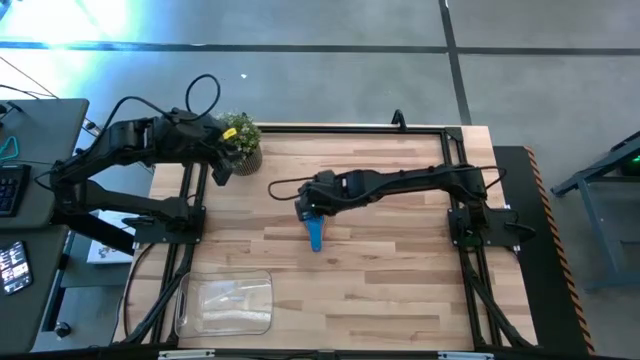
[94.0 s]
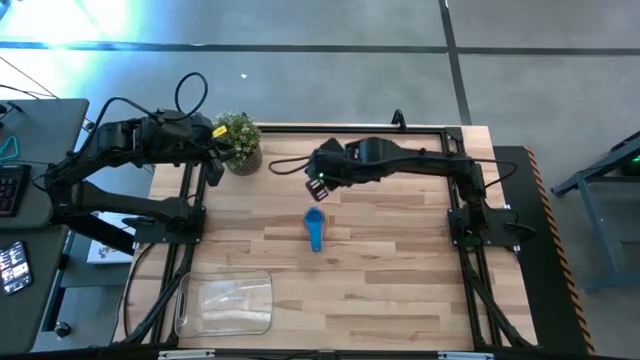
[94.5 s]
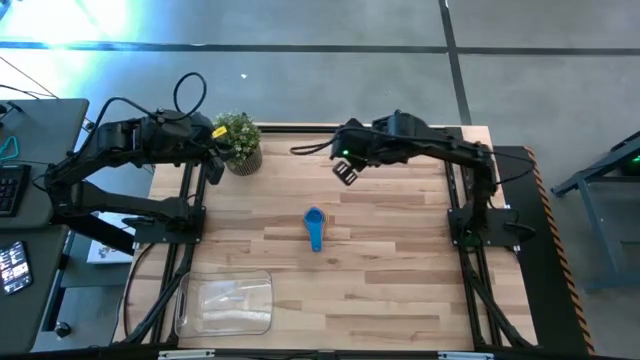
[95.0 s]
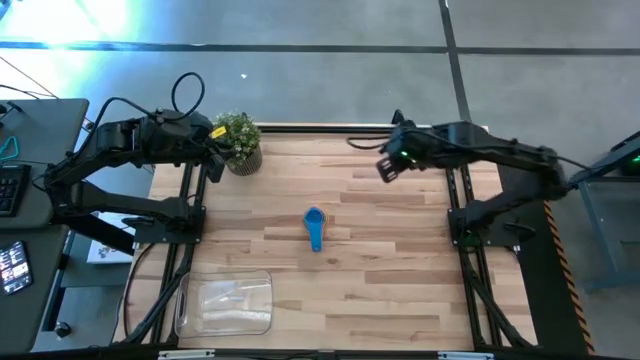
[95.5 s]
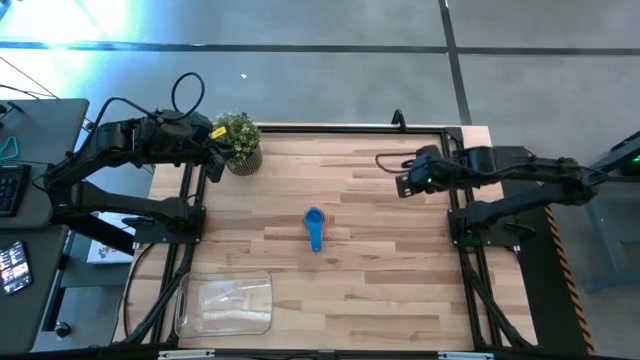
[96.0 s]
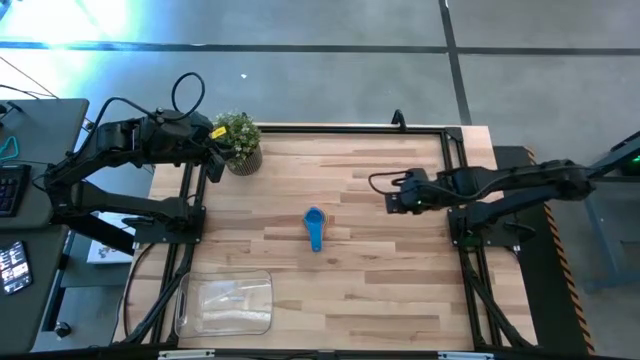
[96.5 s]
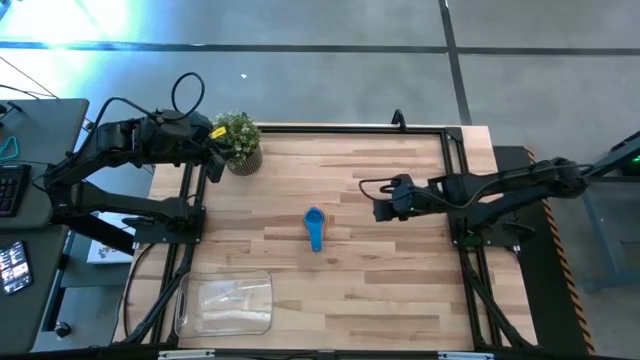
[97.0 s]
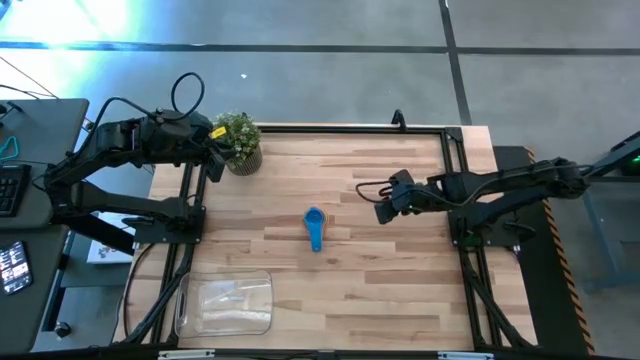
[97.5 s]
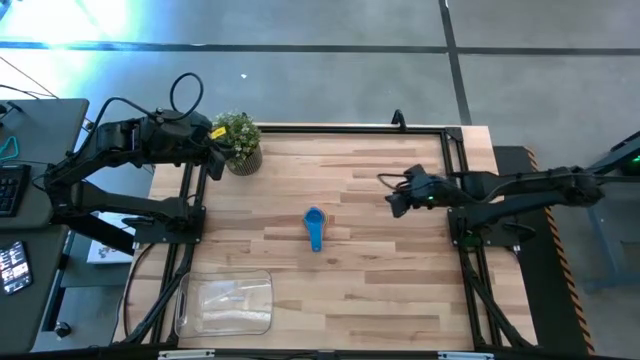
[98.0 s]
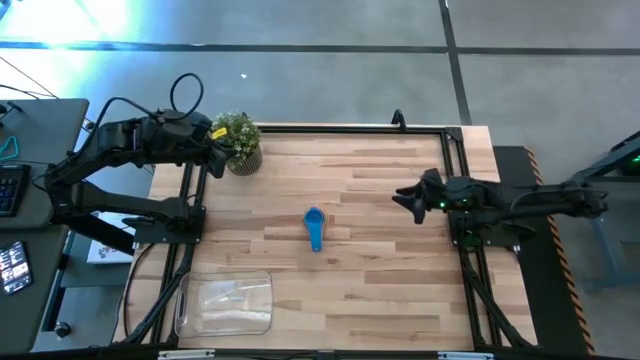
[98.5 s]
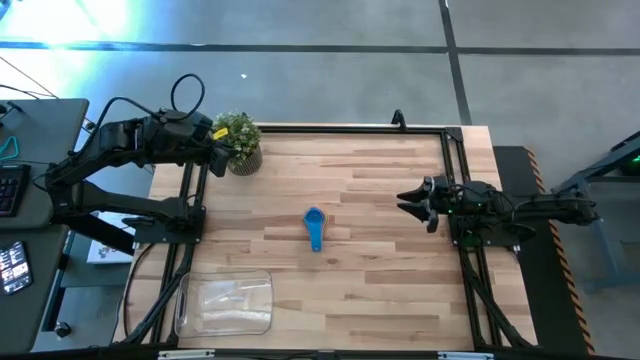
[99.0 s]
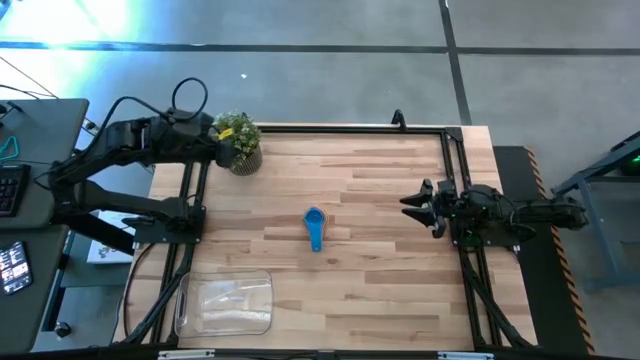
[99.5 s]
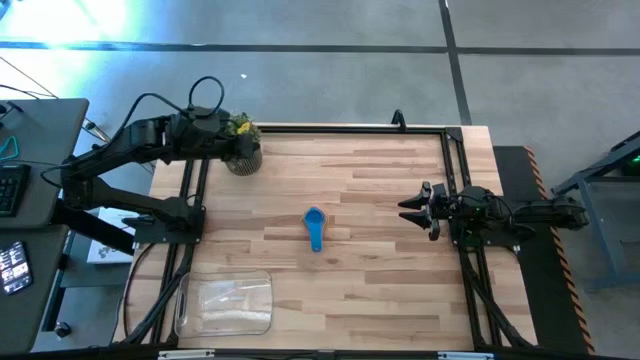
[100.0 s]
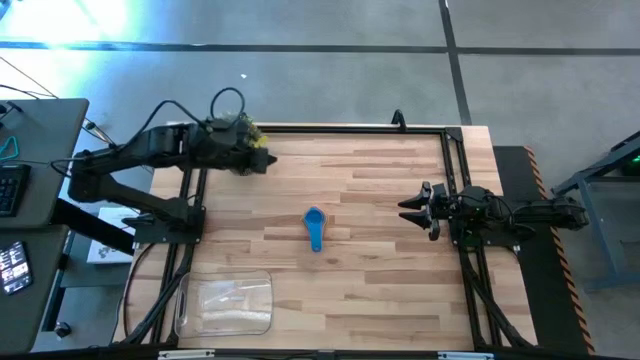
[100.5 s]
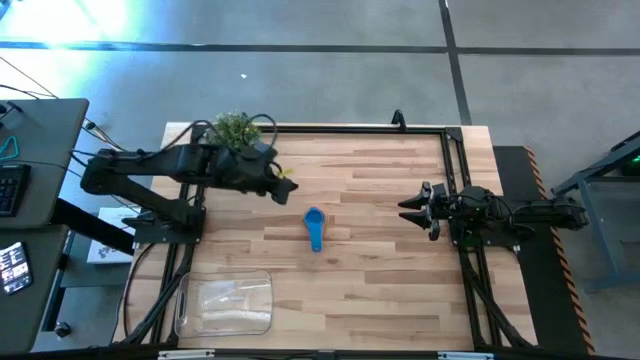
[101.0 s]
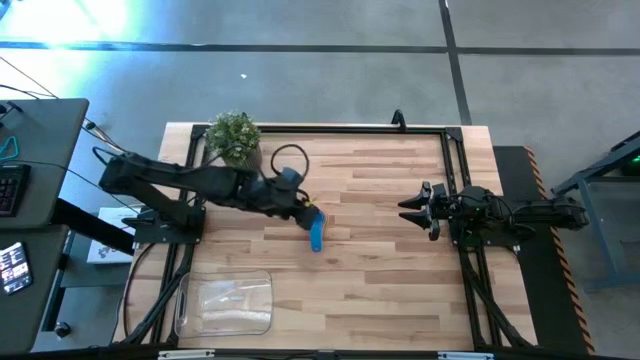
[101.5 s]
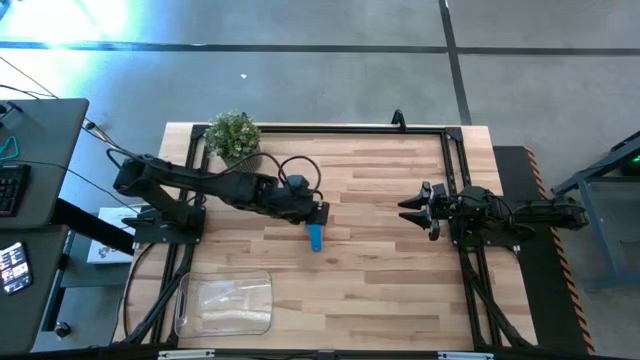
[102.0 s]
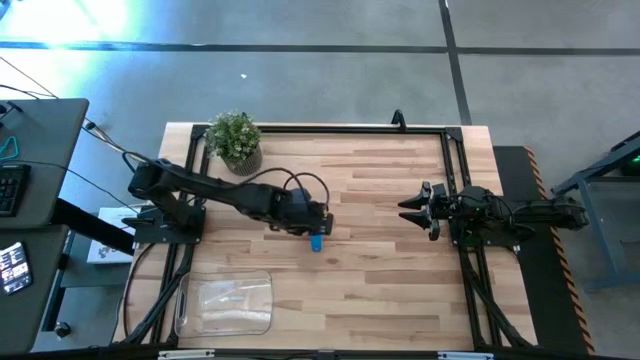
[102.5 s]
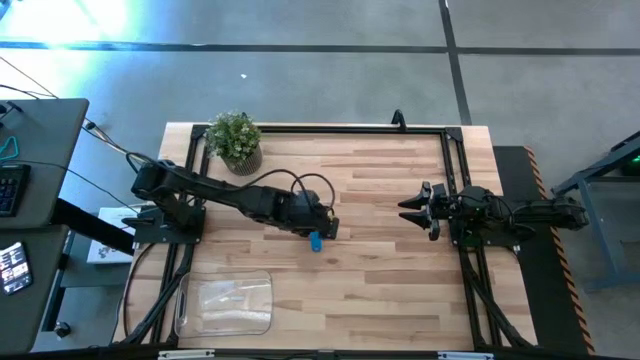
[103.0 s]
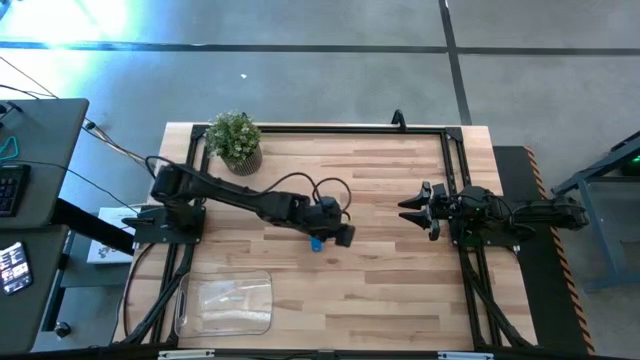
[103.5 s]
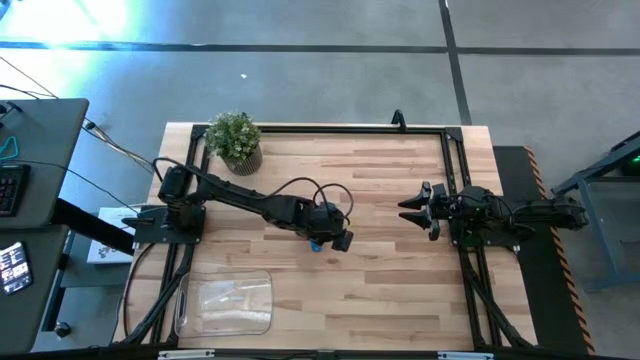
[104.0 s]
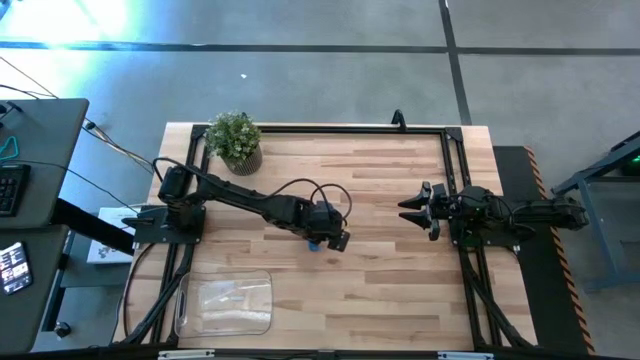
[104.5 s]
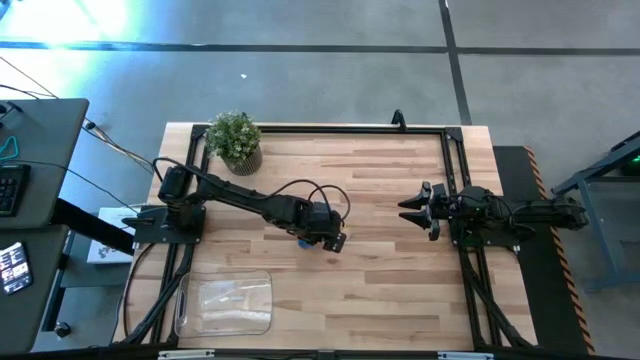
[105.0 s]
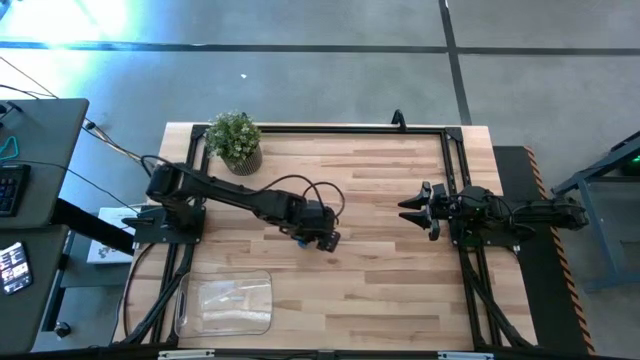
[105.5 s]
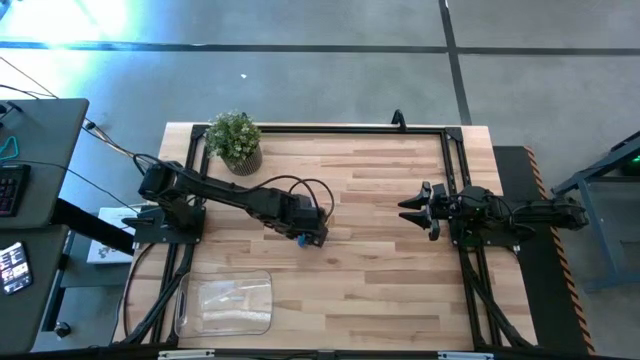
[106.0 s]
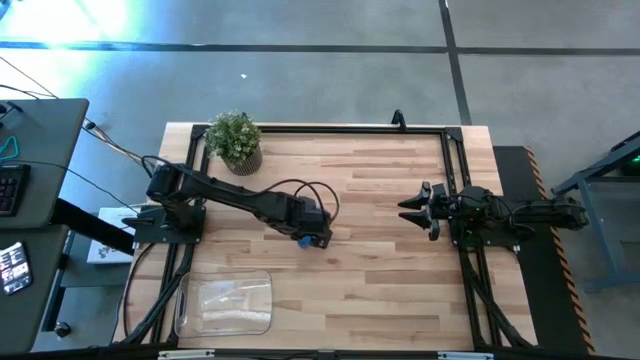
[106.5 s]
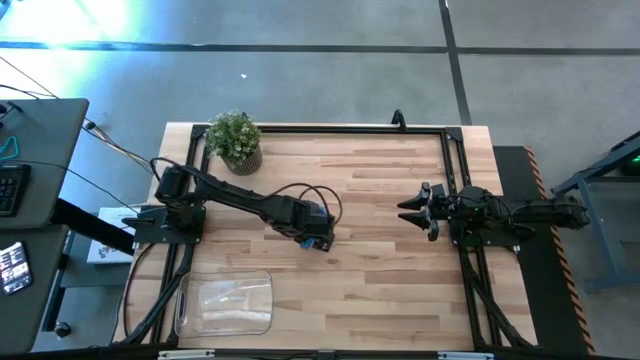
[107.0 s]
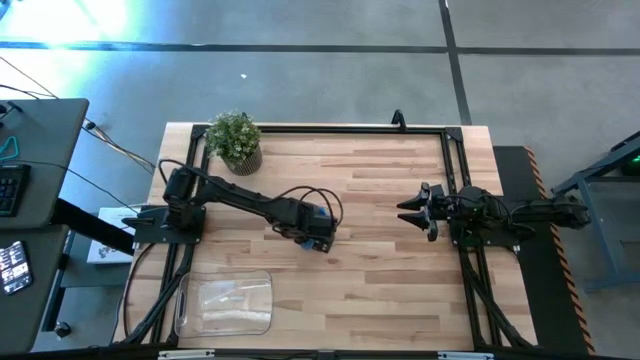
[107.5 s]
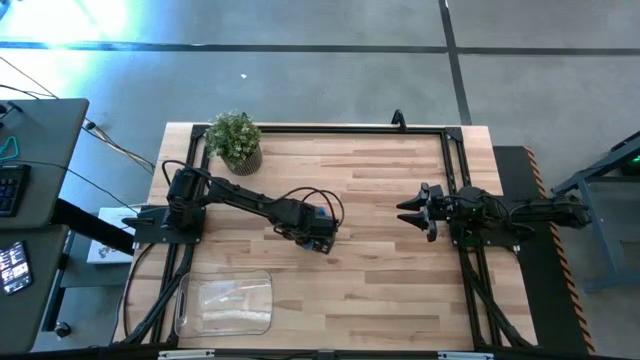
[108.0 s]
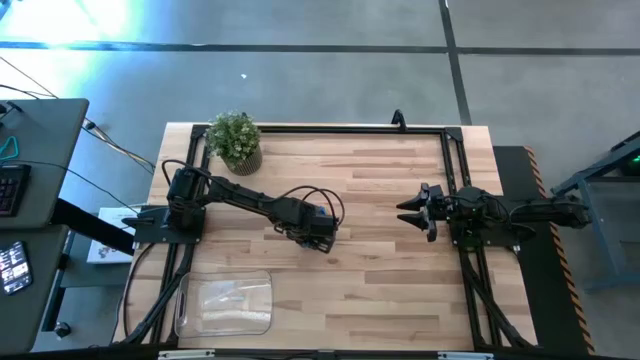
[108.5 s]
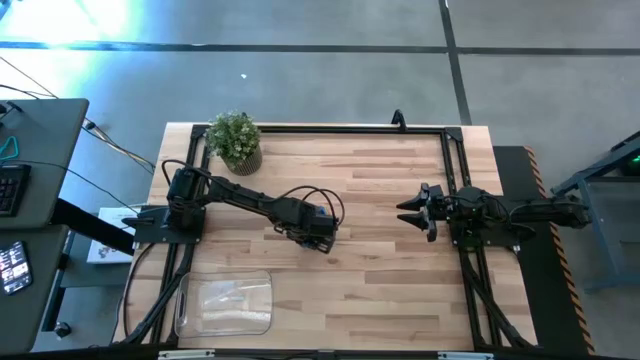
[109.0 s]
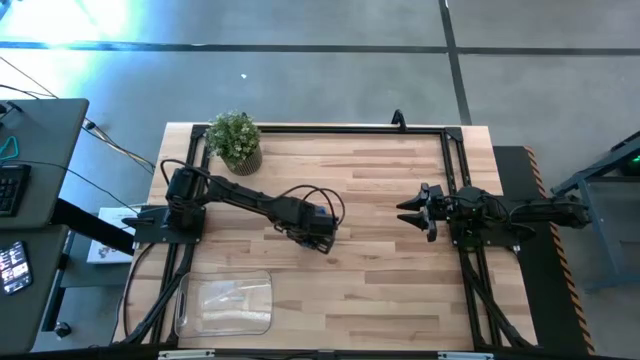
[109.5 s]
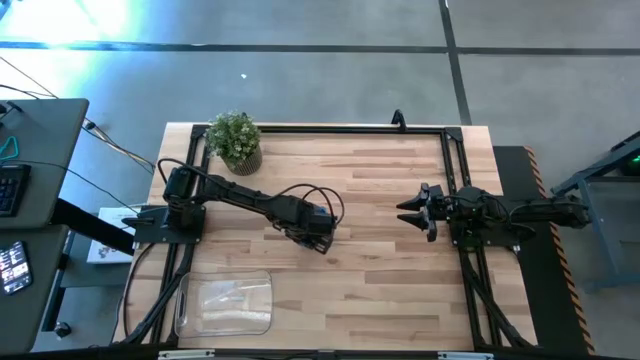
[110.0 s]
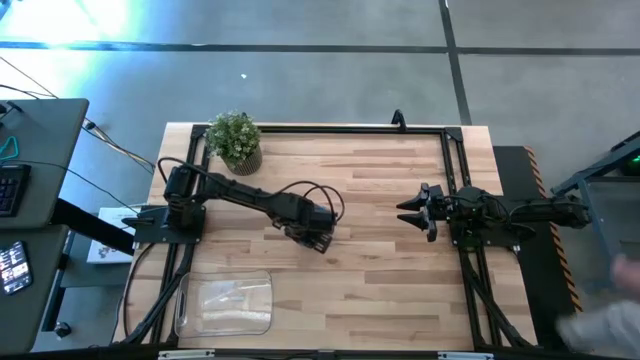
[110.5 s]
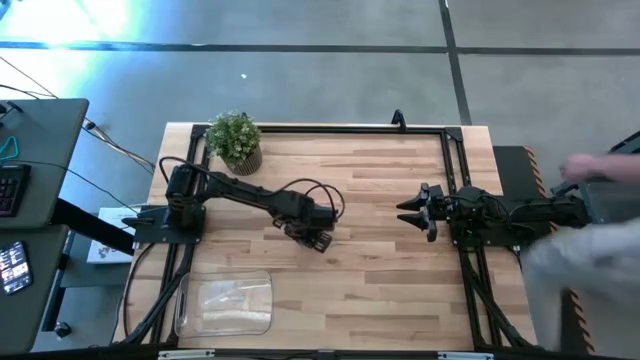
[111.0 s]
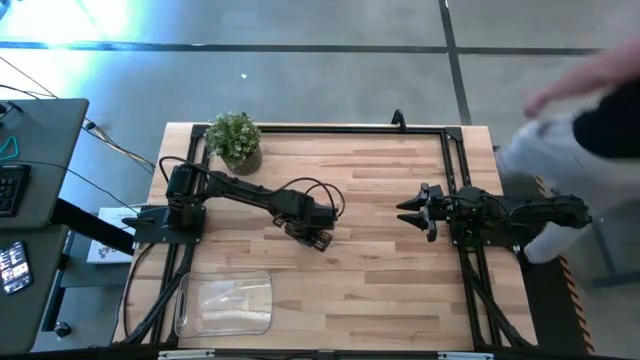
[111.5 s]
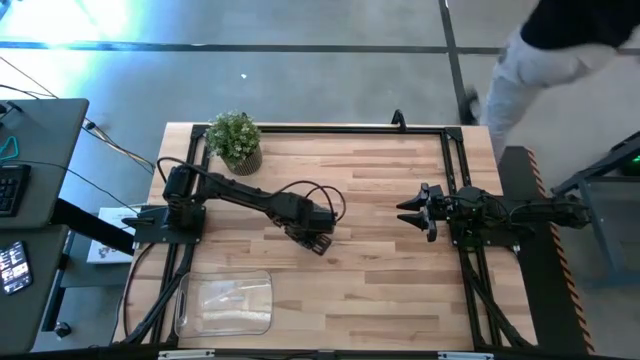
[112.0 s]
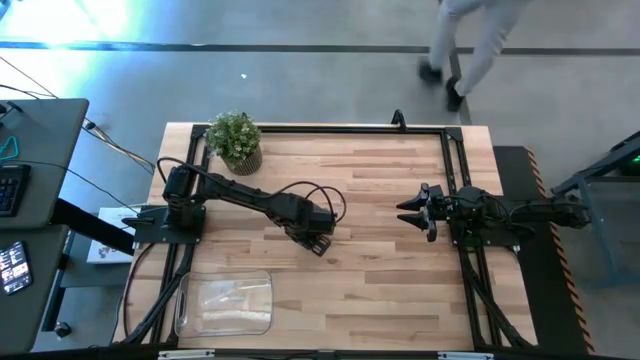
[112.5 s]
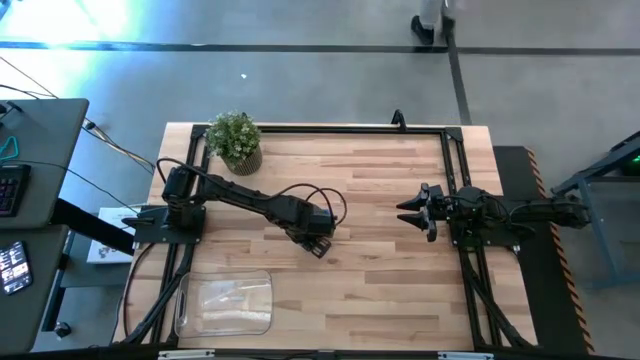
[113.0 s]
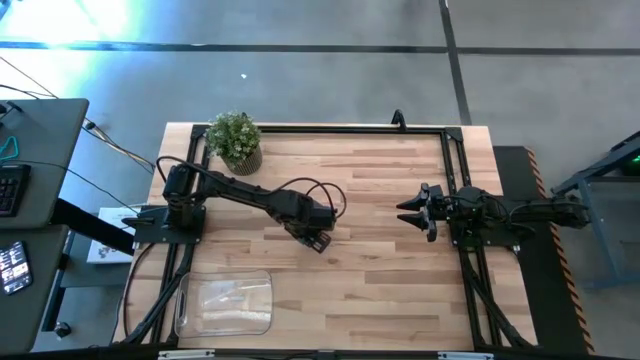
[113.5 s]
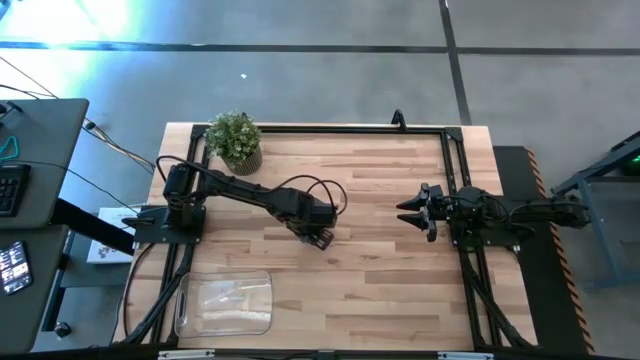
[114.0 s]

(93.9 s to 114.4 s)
Task: Nest measuring cups in basket
Put the stacked measuring cups into the transparent bin
